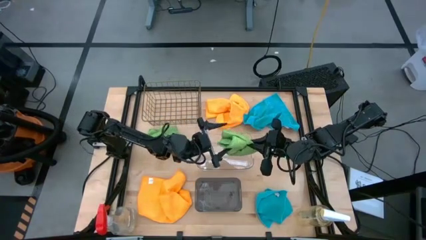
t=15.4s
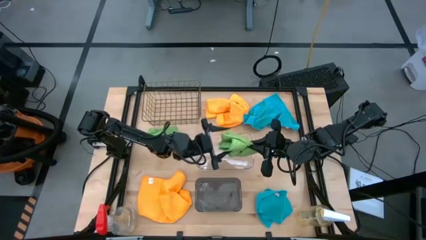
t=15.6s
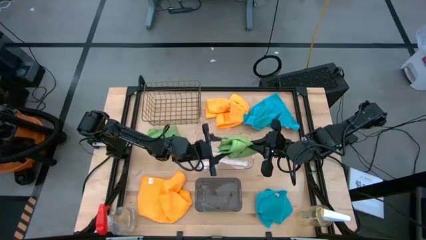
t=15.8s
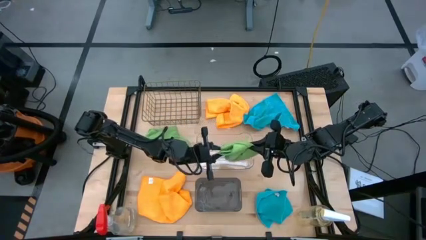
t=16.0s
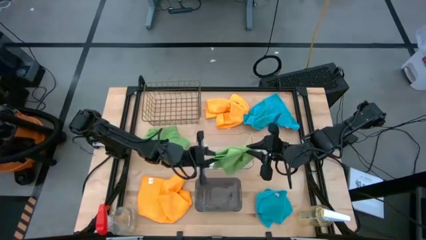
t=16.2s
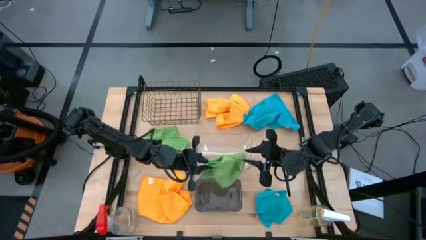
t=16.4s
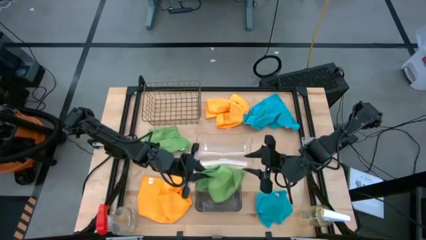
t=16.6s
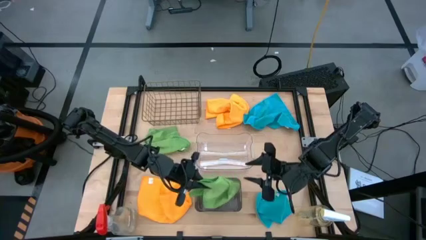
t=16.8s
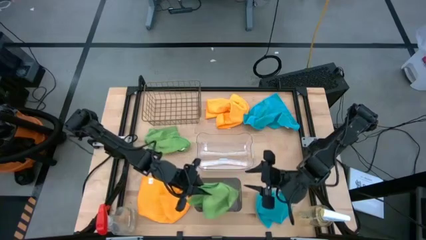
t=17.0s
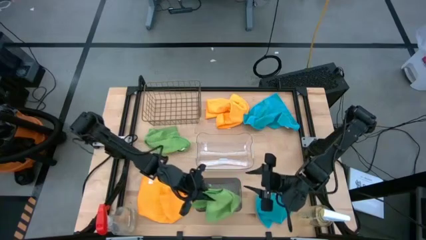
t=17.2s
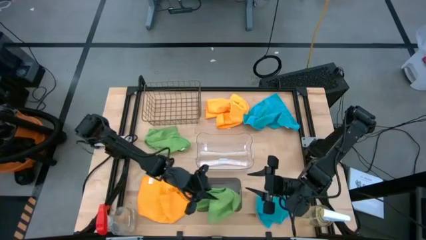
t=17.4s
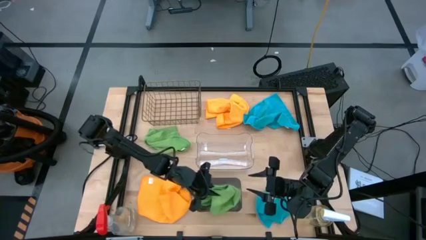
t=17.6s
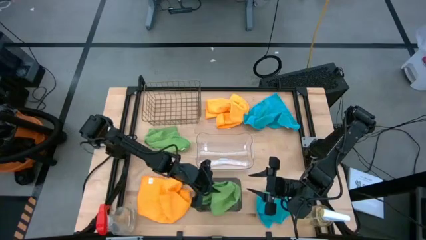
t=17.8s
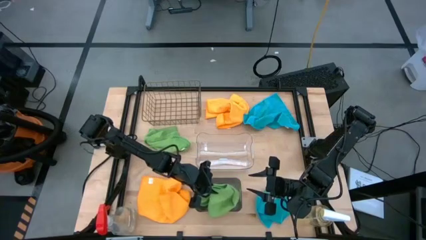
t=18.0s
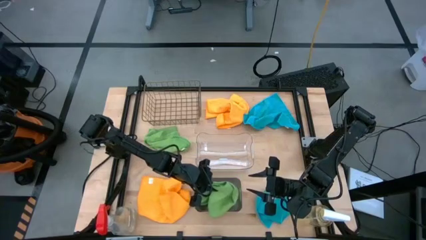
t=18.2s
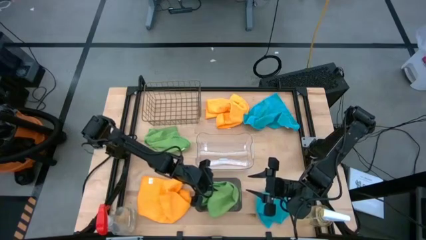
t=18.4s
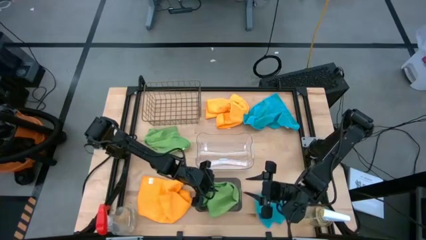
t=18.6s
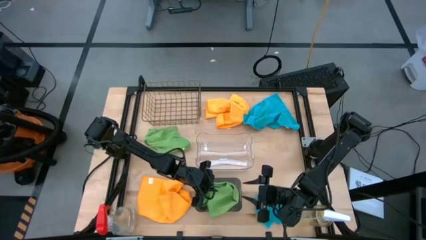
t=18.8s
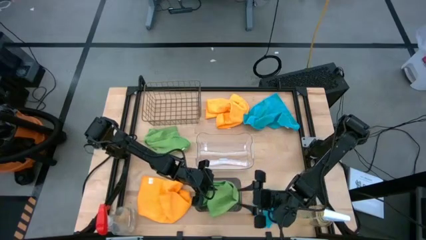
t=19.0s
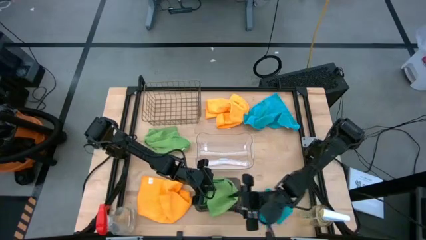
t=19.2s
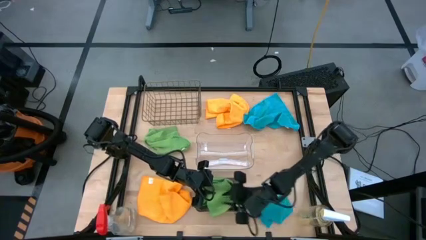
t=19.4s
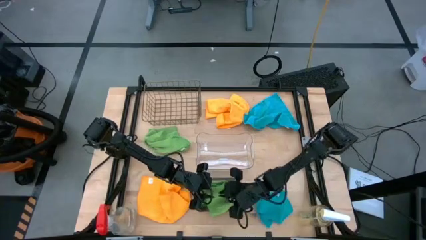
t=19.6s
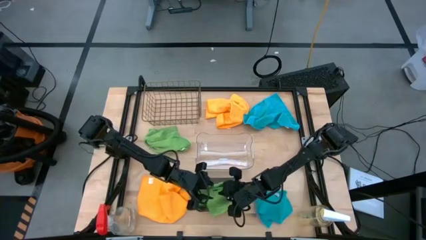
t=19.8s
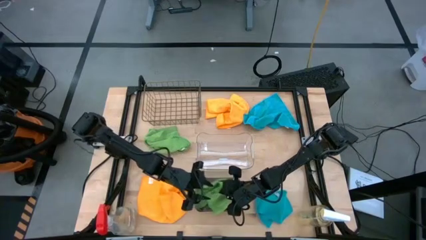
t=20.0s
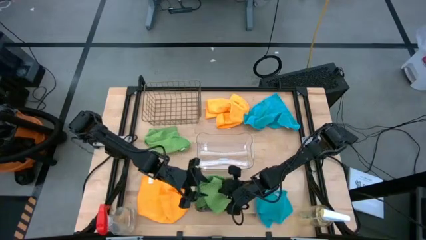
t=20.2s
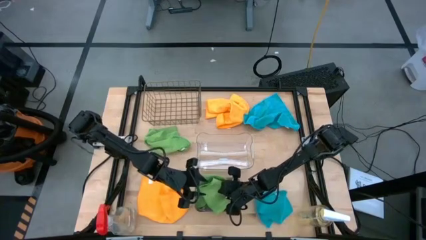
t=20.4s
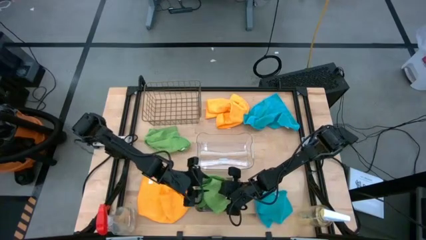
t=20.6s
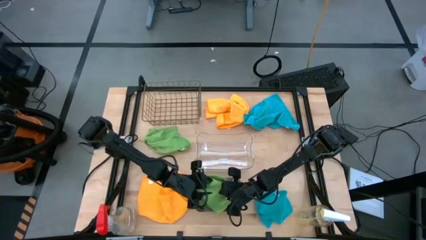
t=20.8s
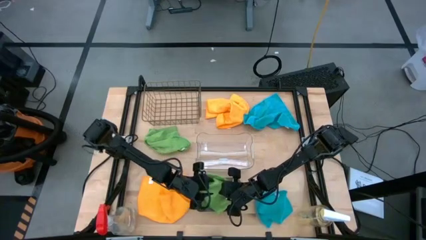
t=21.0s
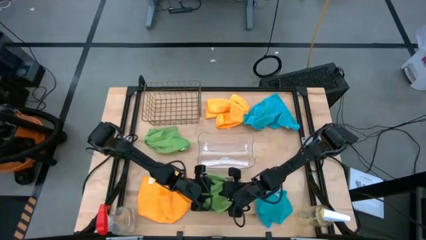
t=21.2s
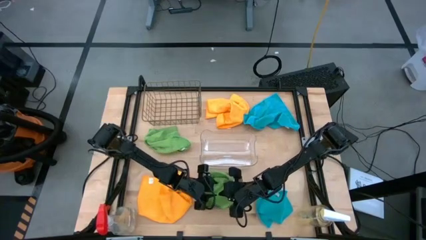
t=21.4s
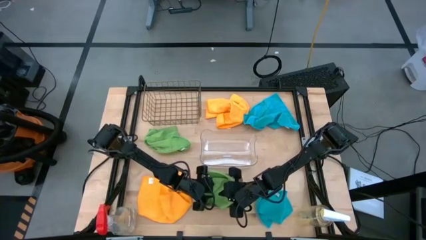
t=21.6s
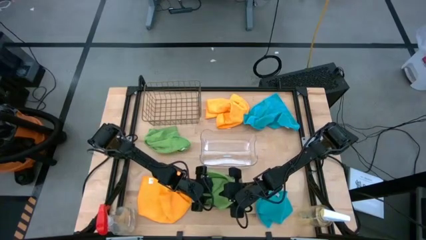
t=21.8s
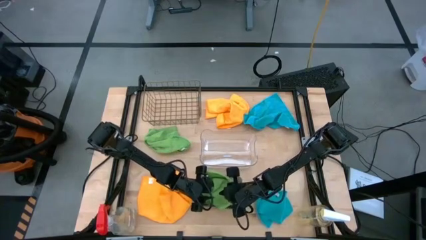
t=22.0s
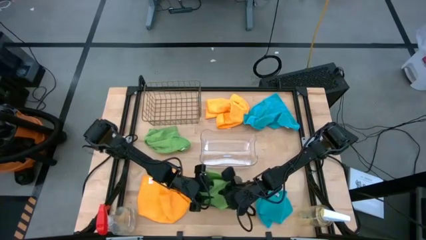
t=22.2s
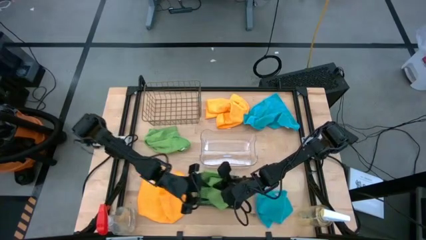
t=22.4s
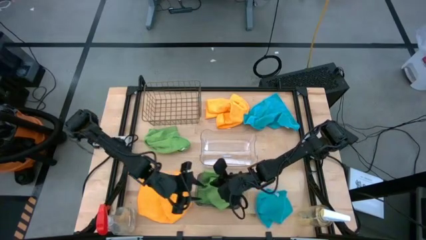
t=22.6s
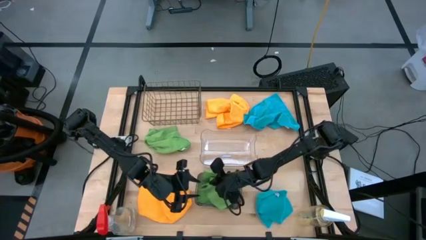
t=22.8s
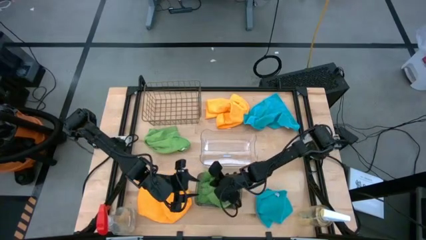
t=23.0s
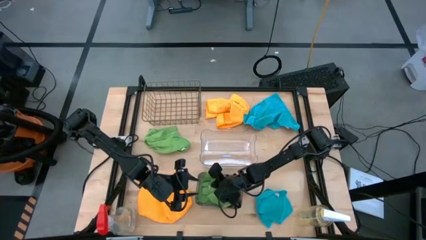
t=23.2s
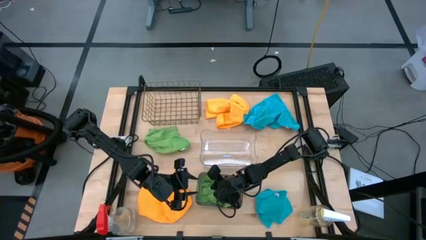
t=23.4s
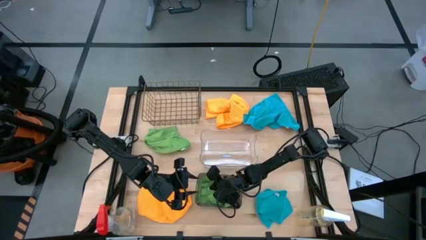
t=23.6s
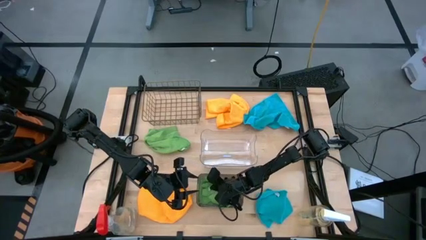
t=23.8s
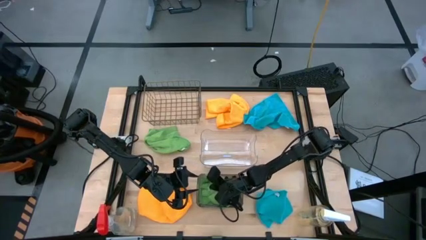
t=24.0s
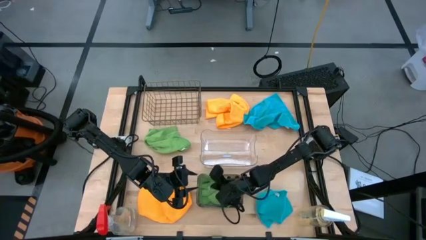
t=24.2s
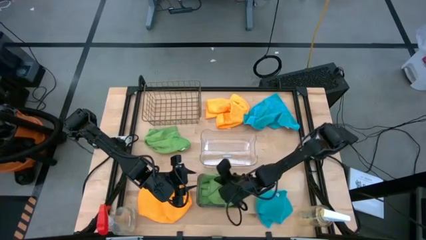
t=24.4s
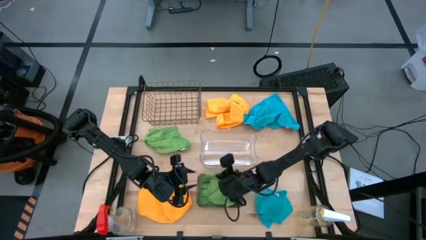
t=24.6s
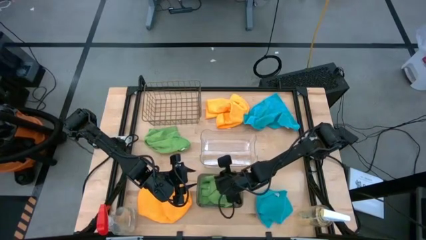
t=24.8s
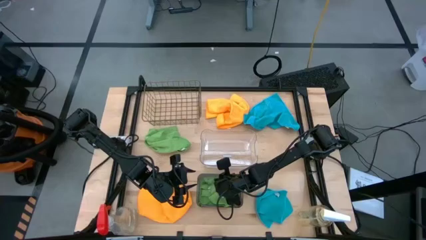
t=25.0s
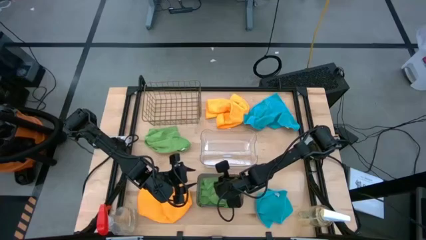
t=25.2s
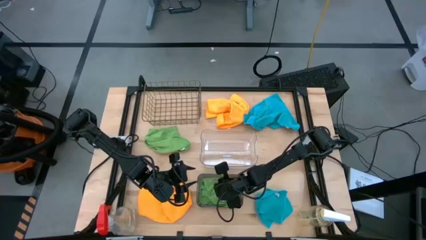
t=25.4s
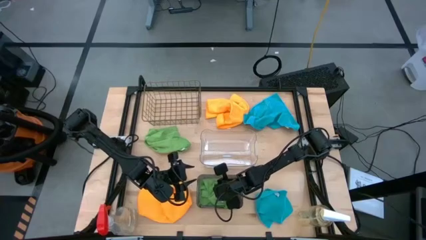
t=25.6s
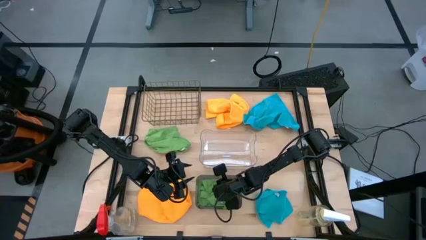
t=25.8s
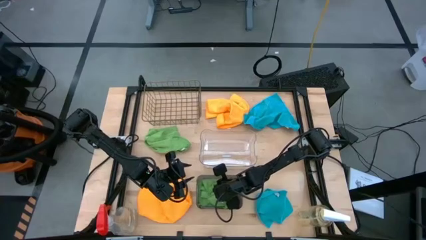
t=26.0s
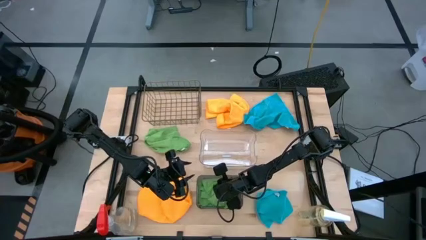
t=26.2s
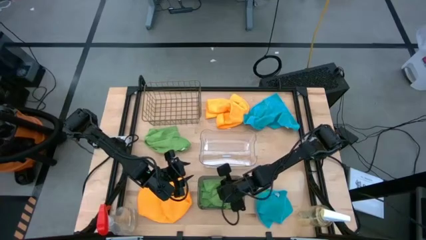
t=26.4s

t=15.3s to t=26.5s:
Task: Sort microfiber towel by color & place in baskets
Put the right green towel into the black transparent bin

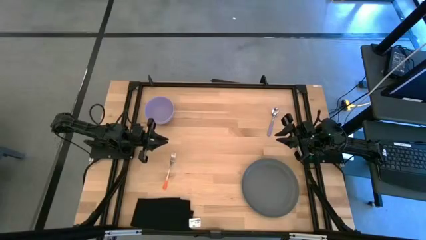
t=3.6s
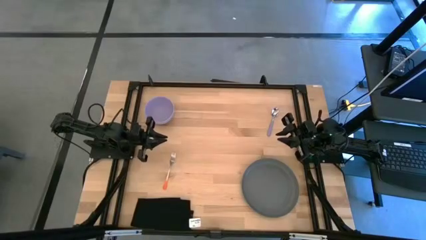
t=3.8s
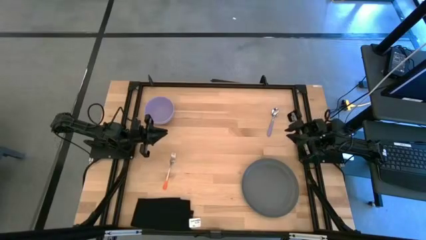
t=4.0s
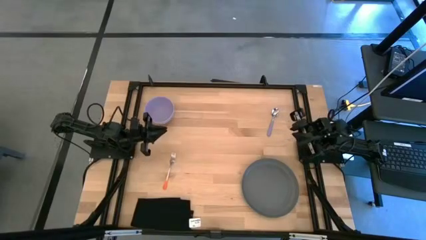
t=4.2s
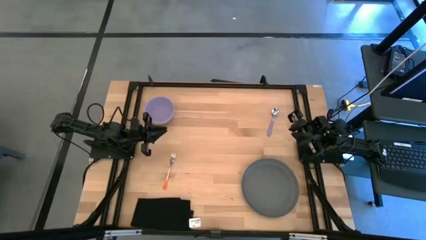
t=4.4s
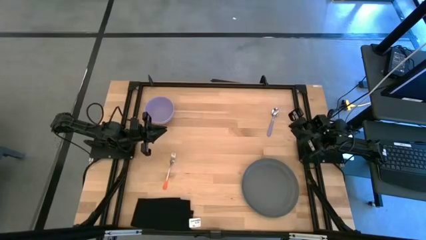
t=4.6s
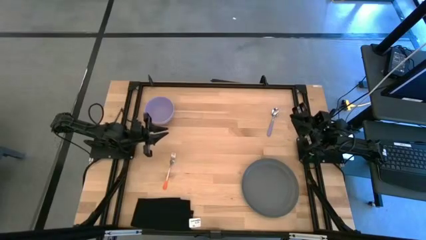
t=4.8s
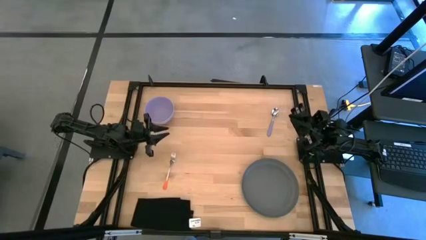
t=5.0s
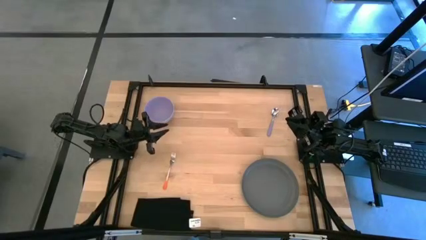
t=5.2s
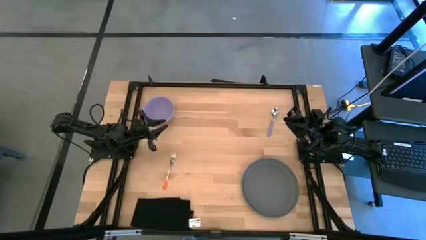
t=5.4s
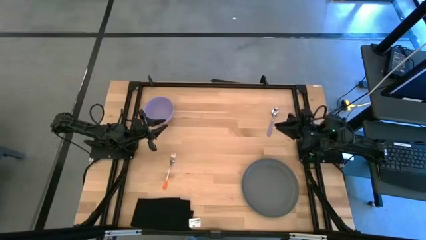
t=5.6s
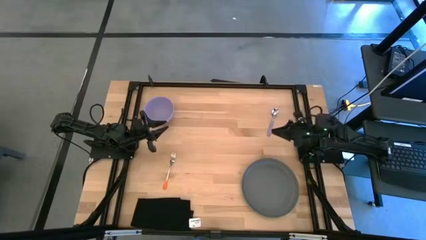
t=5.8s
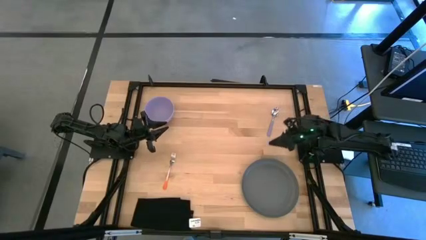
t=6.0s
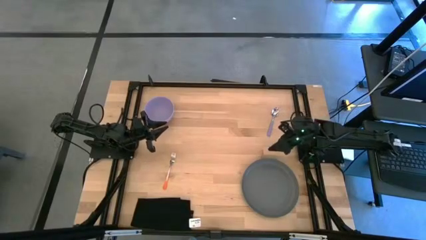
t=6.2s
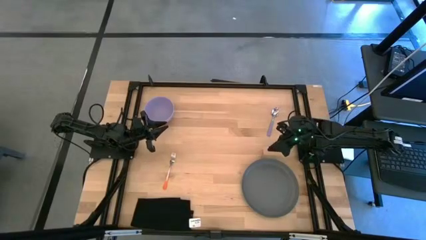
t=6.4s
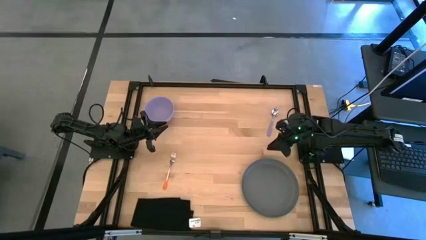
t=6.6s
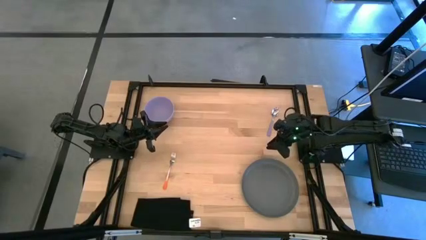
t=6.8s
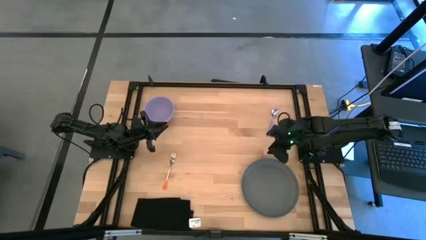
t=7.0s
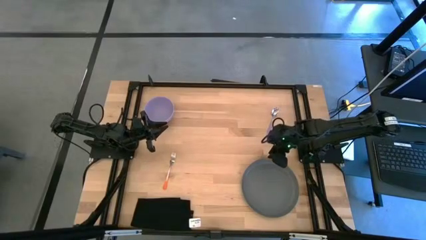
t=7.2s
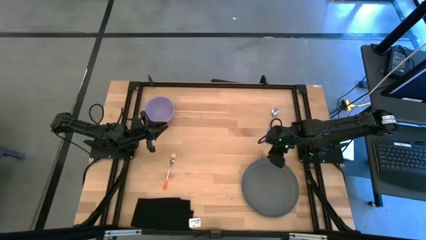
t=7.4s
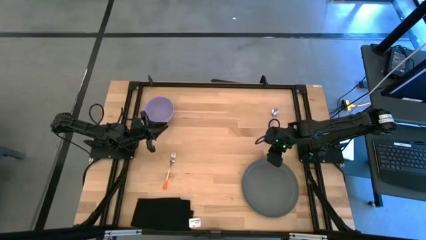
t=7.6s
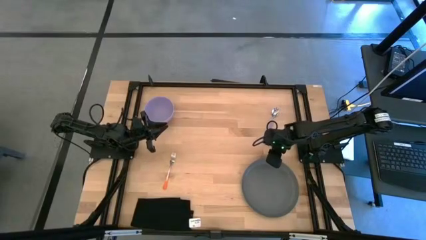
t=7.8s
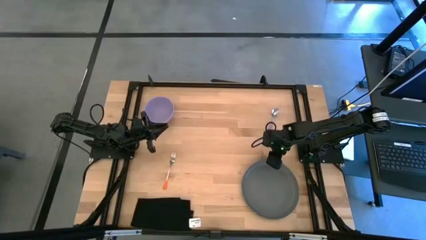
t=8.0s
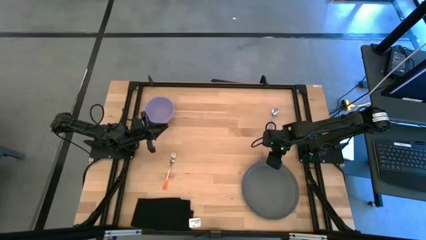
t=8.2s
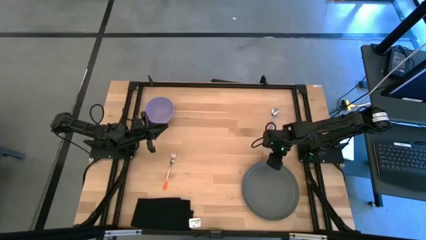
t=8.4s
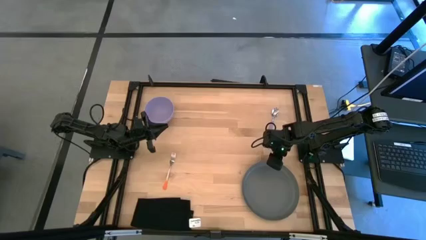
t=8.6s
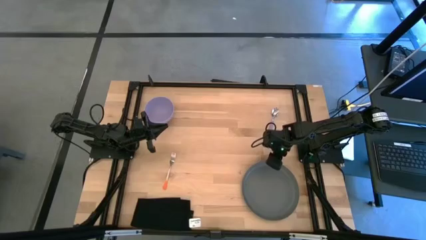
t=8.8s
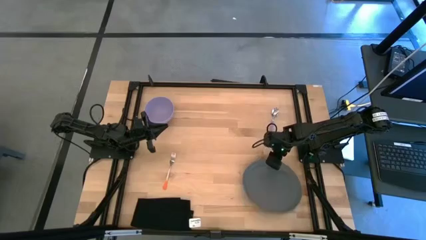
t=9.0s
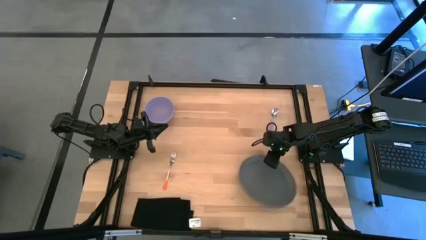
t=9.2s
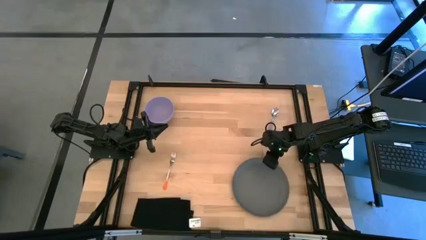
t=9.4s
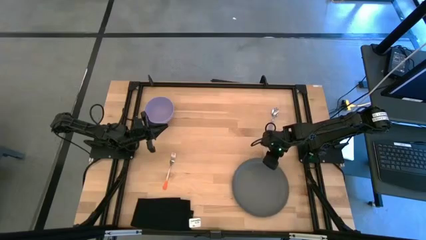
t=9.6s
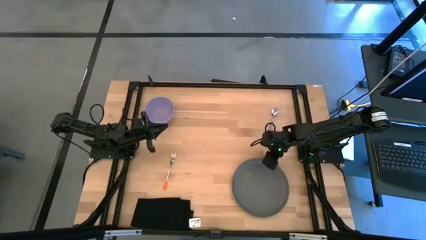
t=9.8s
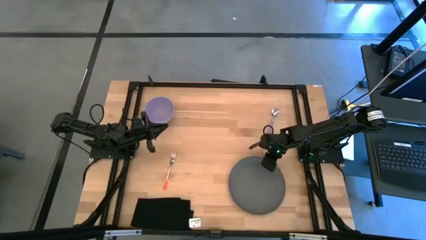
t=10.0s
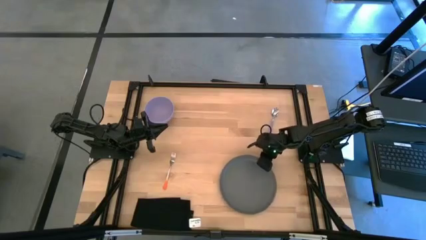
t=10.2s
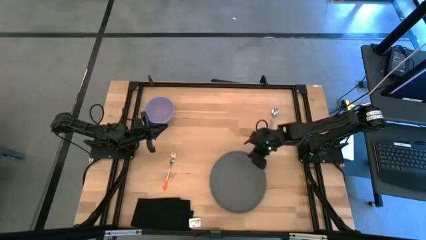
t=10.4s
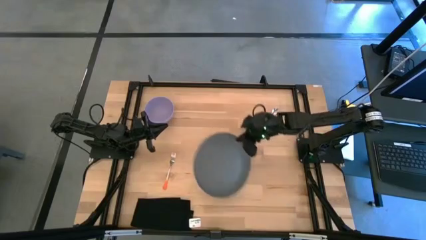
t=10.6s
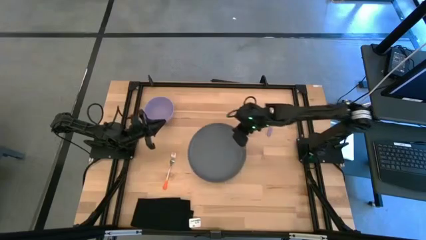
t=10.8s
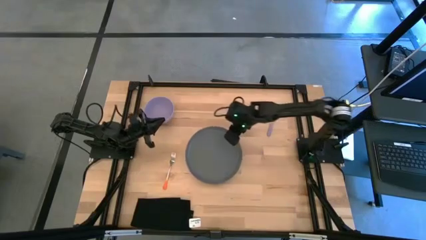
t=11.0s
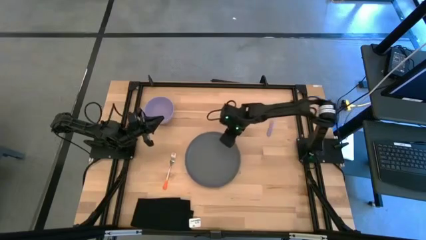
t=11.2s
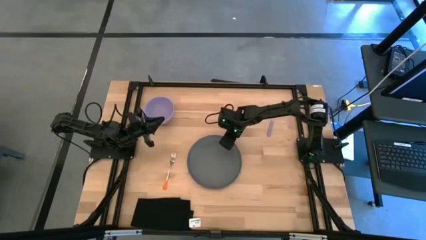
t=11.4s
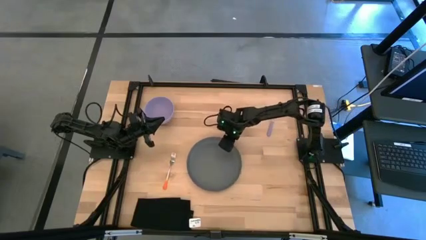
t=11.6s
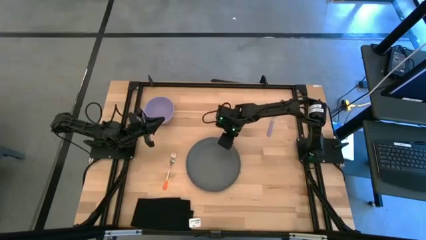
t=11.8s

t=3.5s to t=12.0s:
Task: Set table place
Put the gray plate to the center of the table
